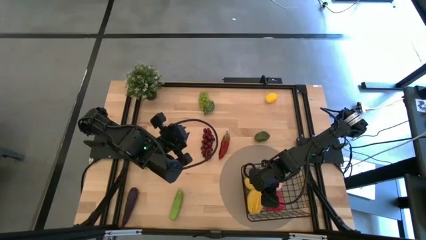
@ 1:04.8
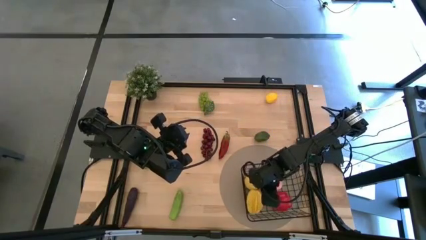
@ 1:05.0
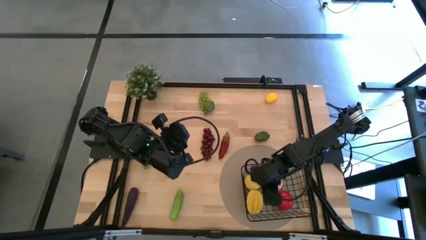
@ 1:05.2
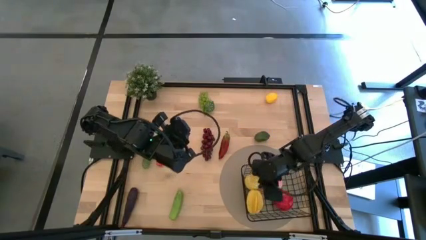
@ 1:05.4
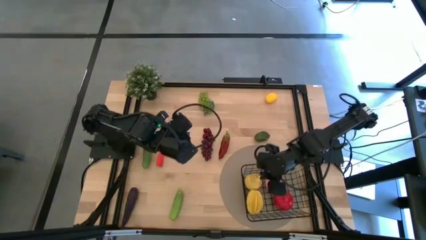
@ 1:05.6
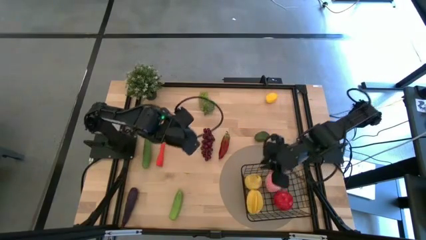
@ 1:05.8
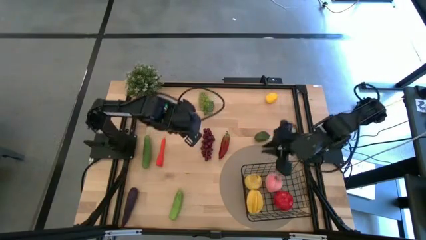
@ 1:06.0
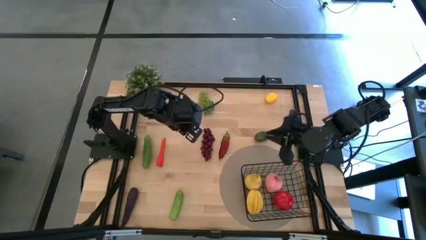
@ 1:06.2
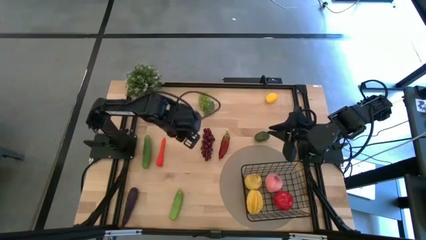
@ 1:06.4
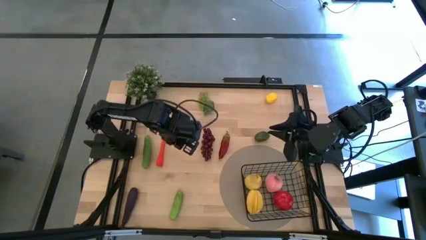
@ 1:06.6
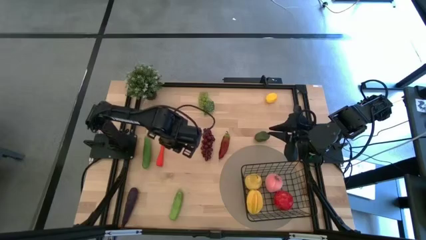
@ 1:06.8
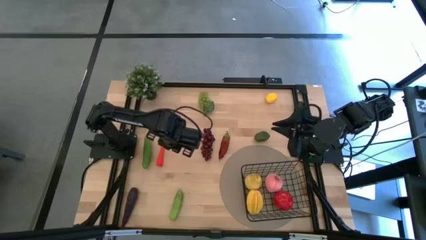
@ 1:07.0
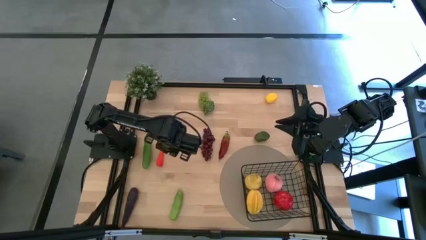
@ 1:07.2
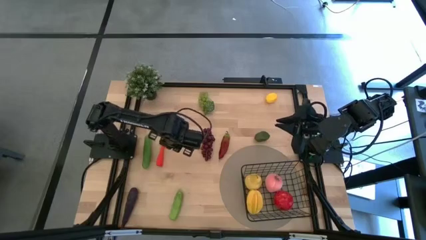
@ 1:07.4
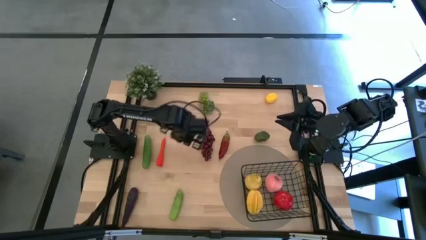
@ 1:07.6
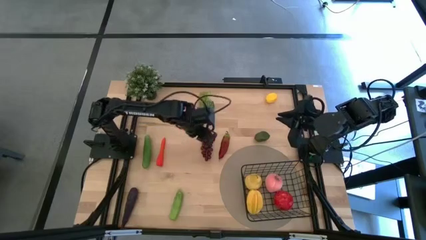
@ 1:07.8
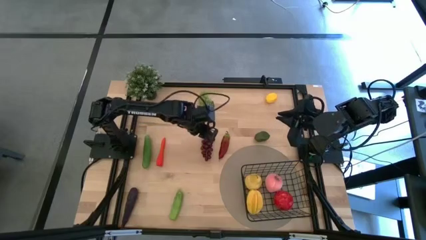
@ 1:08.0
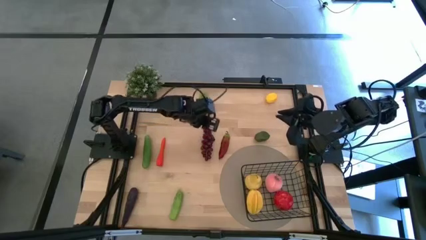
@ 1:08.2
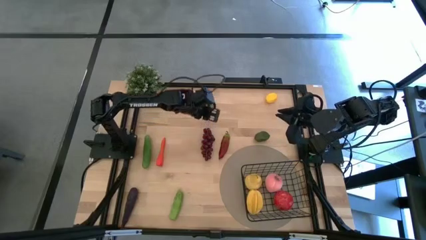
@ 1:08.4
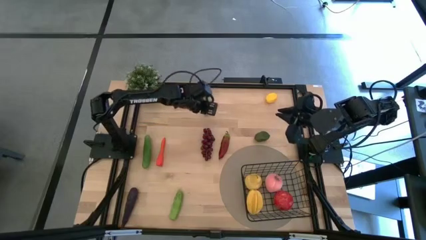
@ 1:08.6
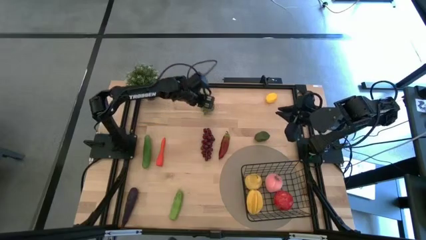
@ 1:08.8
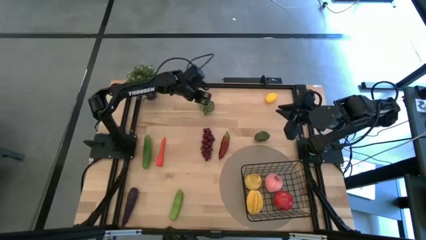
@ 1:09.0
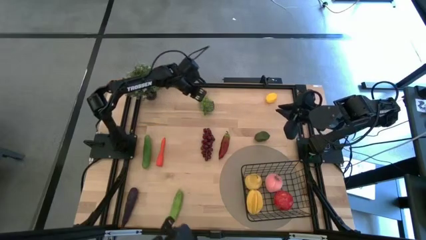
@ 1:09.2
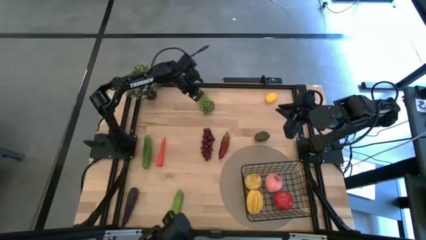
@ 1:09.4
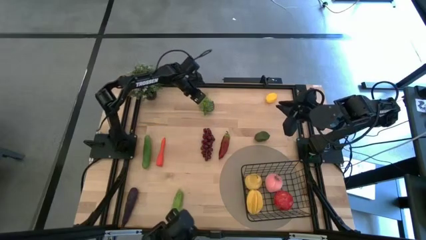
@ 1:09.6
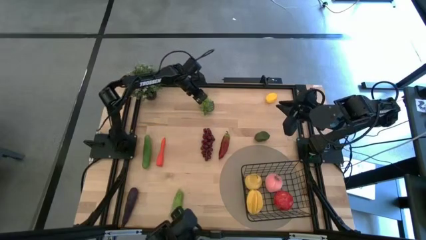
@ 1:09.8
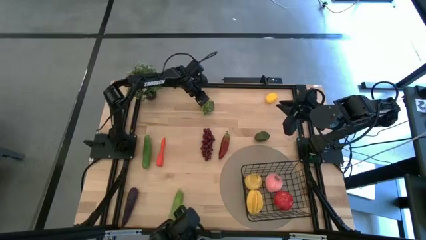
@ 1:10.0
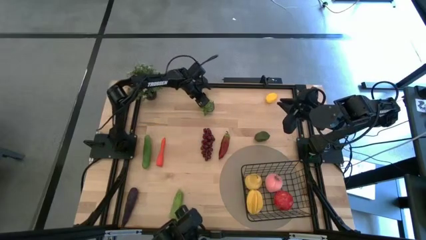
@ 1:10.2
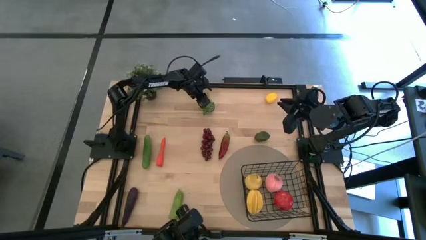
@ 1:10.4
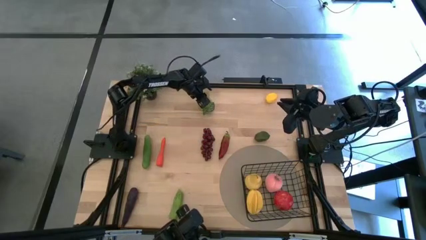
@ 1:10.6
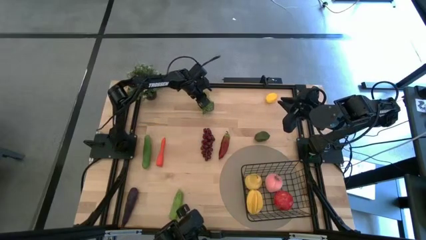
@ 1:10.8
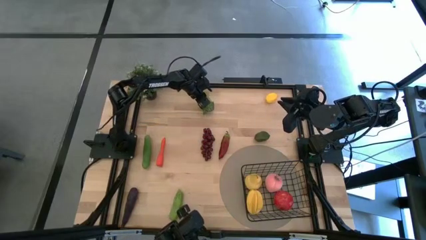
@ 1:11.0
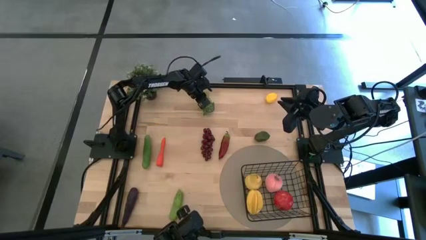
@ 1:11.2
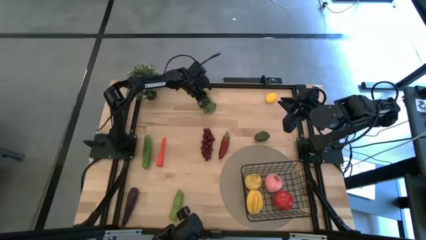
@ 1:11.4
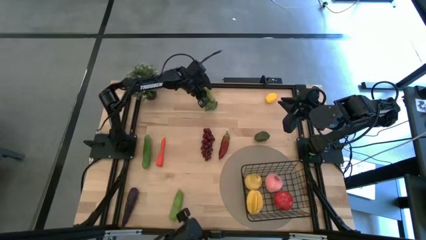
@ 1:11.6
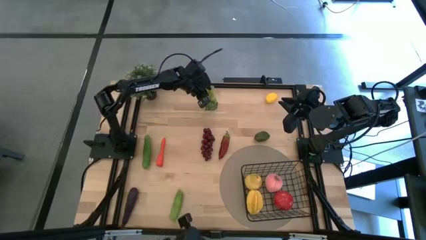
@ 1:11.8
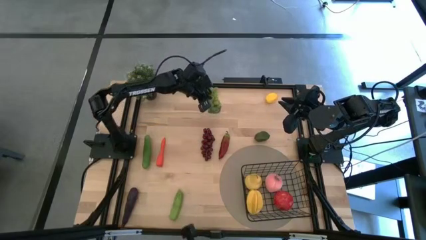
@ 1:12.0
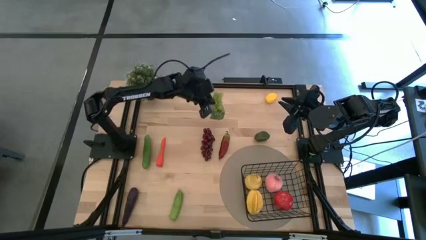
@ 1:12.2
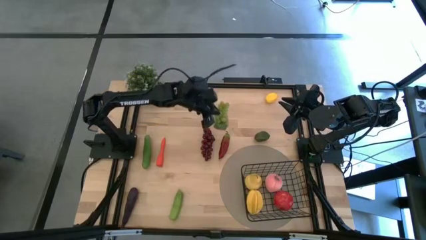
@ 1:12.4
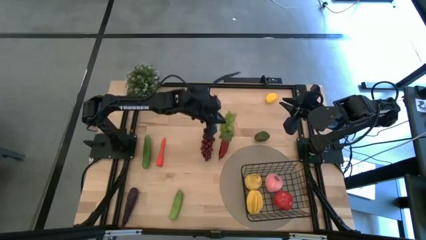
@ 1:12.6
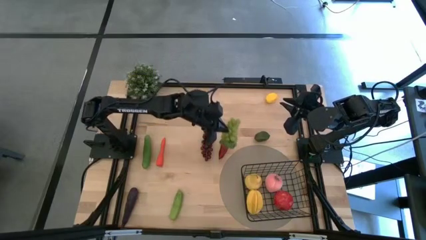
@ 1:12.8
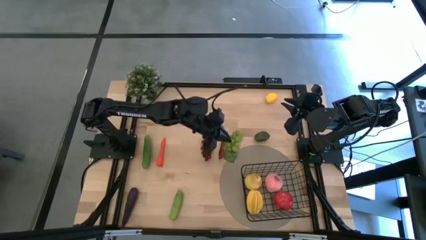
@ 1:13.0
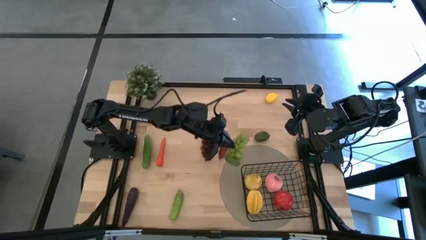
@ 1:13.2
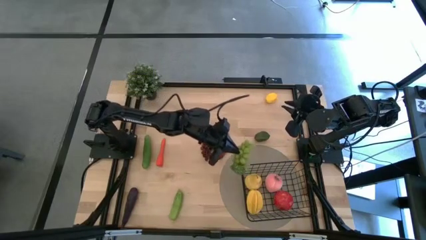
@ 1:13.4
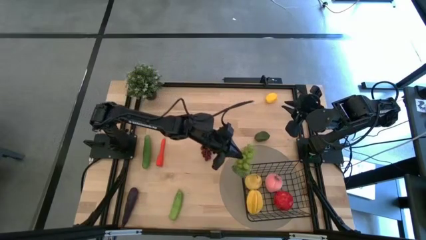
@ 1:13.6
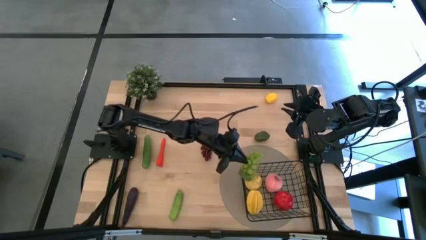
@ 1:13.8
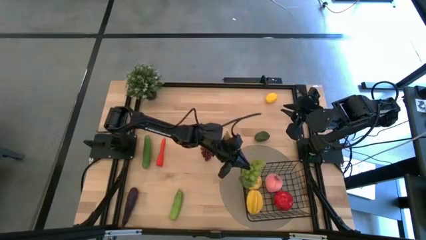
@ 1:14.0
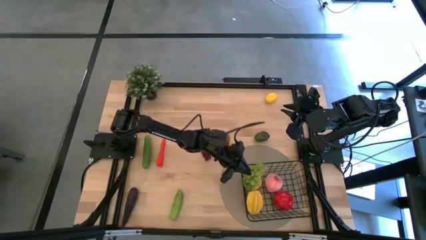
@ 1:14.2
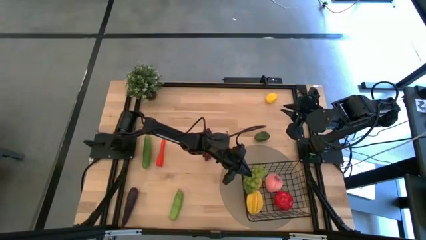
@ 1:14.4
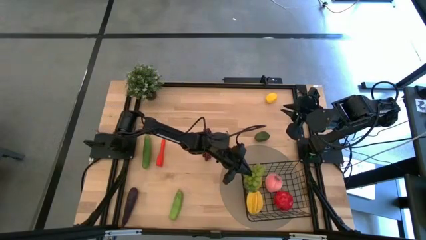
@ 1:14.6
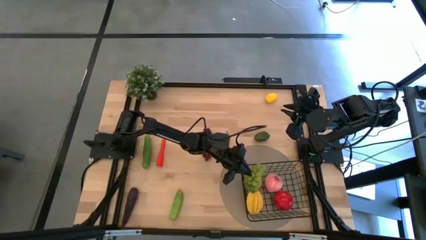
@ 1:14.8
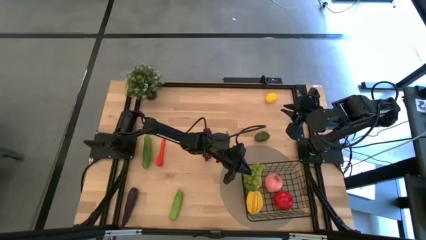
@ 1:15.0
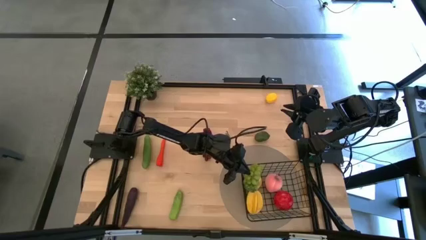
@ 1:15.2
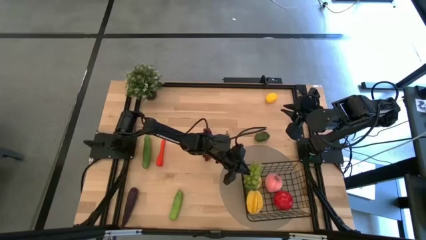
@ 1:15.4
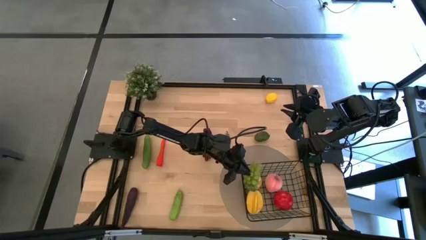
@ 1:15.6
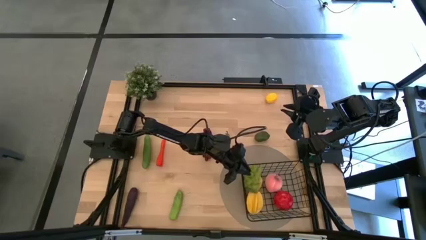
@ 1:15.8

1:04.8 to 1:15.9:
Task: Build produce basket
Put the green grapes into the wire basket

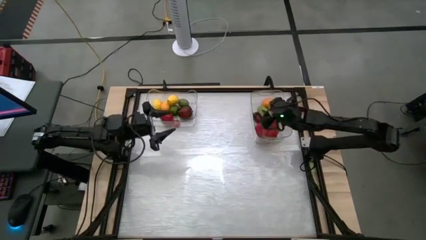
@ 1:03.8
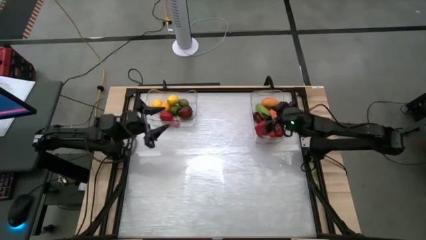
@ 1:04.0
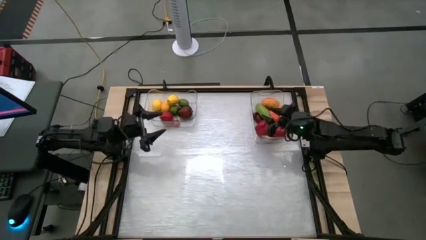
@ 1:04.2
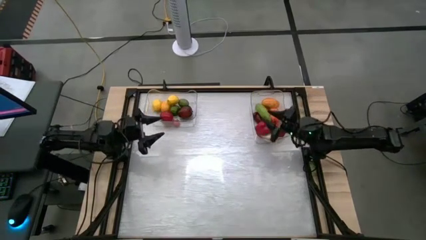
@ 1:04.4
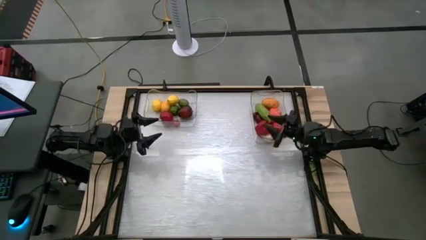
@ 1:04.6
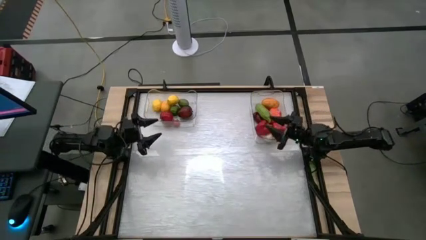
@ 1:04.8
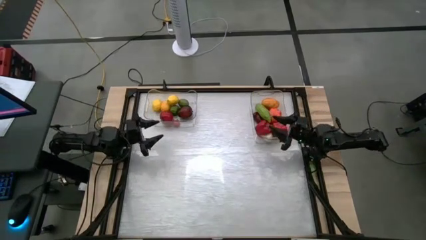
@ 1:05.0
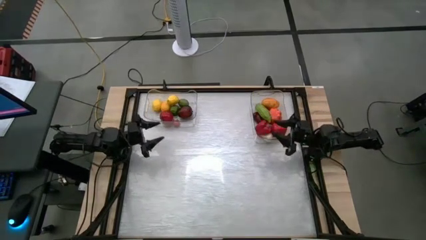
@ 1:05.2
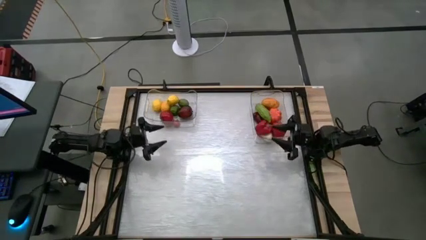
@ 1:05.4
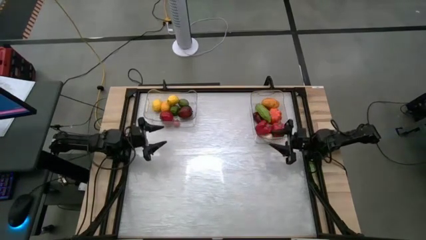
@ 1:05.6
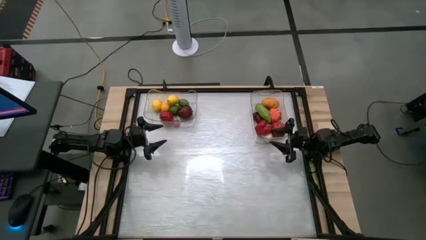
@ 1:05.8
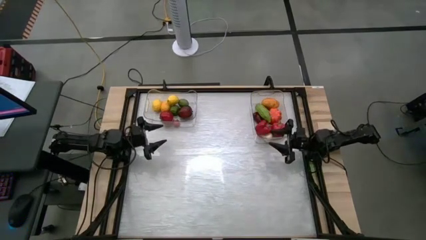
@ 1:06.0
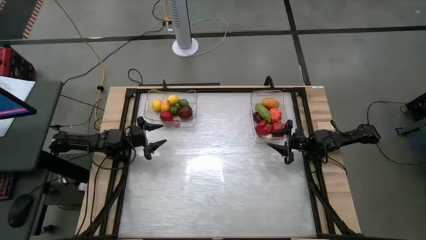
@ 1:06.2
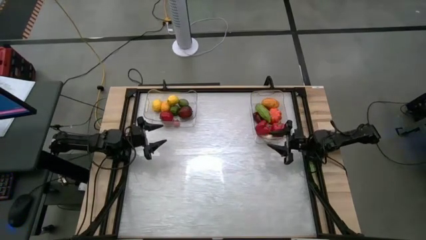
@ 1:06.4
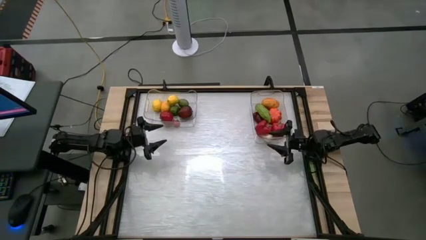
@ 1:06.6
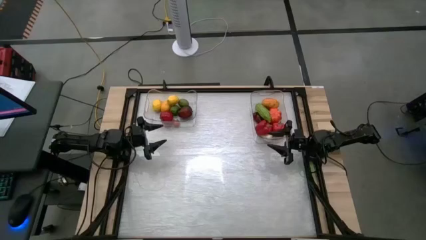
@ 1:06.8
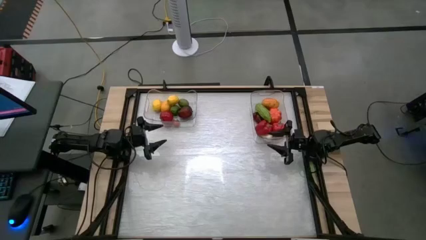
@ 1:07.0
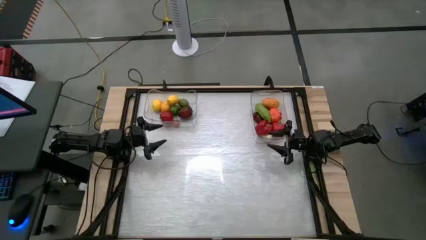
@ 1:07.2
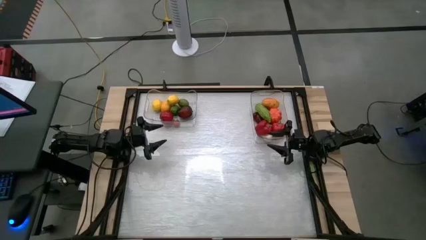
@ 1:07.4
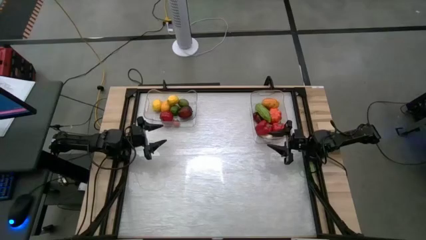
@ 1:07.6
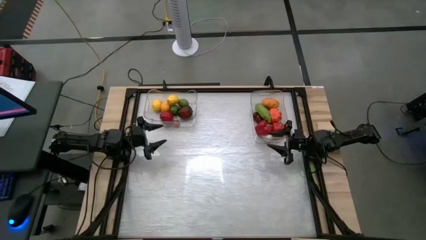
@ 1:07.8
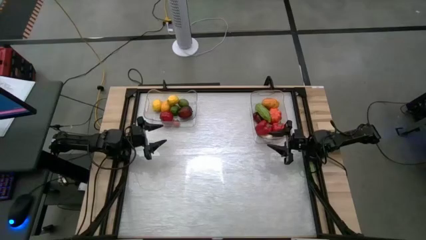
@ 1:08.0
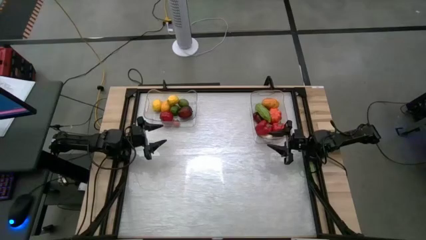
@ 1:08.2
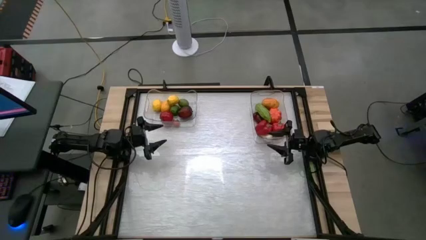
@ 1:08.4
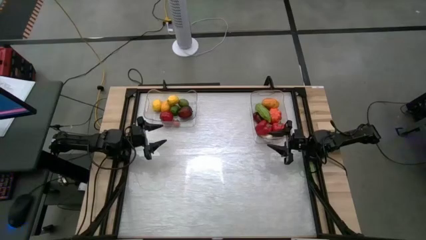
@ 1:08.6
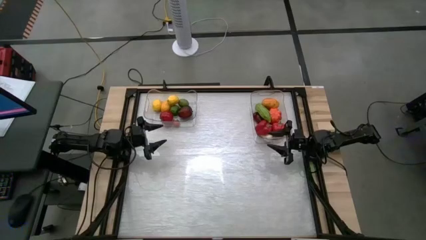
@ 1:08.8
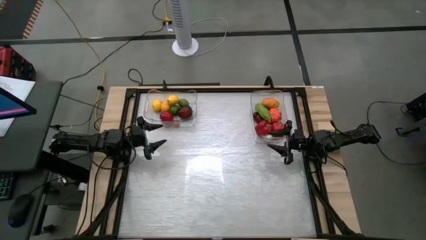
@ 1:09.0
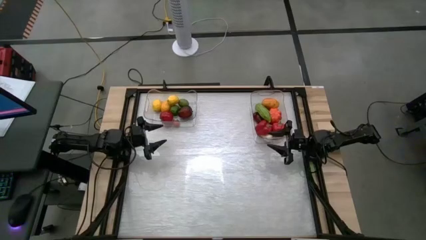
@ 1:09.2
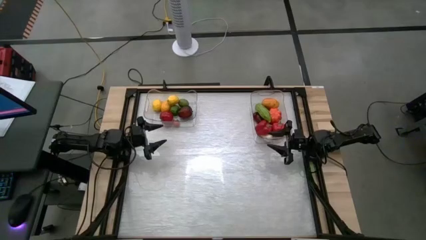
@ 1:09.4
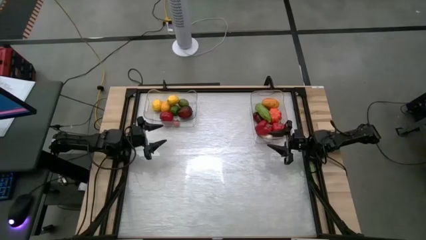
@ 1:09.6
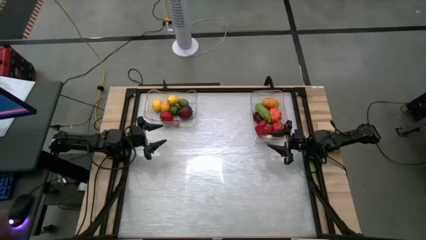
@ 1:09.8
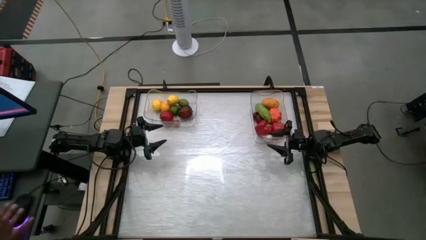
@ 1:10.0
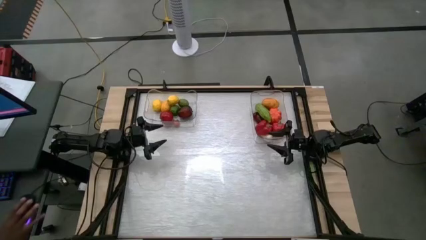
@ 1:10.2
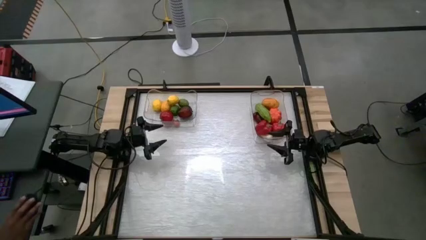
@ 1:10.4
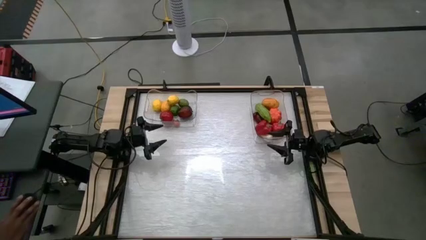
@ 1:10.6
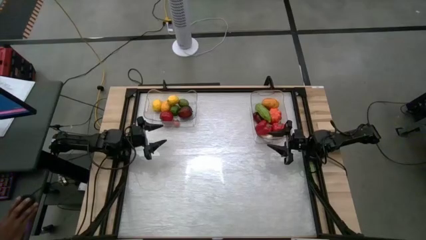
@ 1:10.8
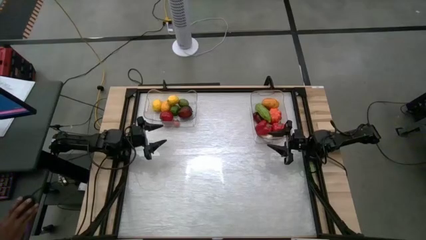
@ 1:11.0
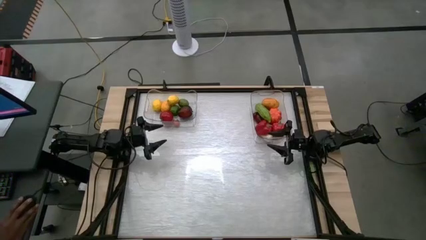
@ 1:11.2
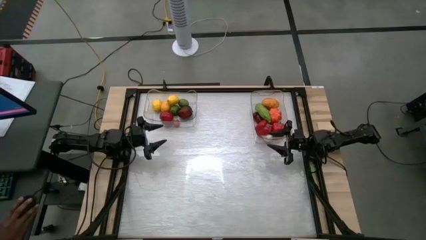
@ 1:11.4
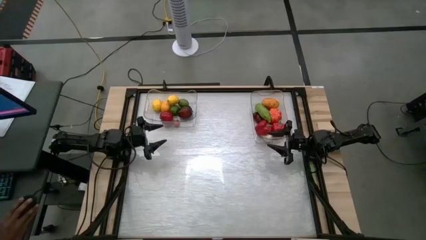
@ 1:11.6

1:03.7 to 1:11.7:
Task: Sort produce into baskets
Return to Home Position
